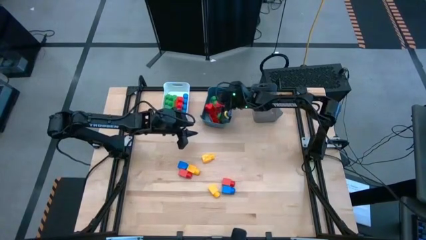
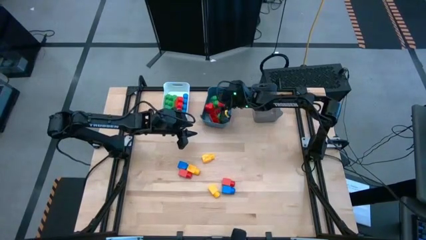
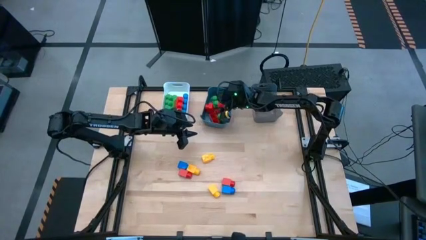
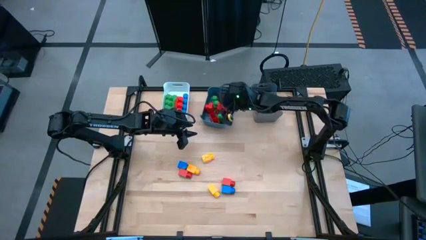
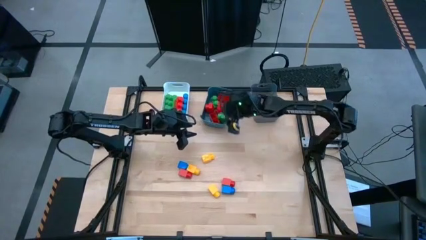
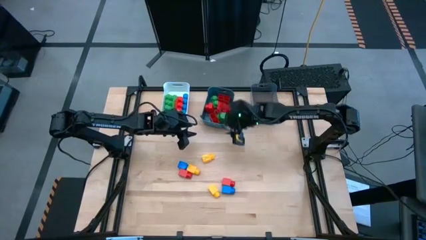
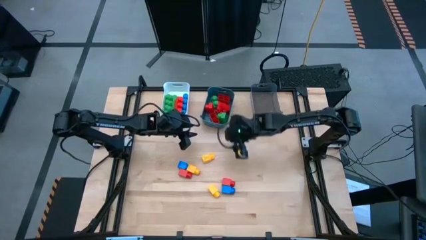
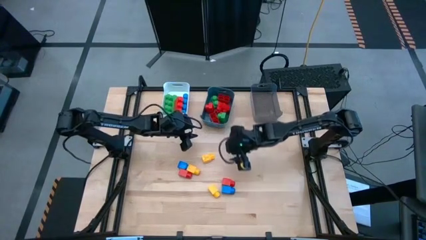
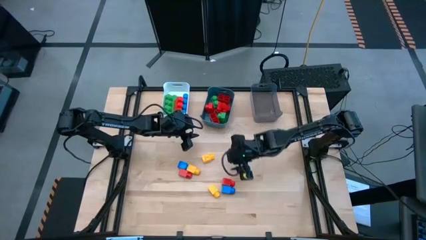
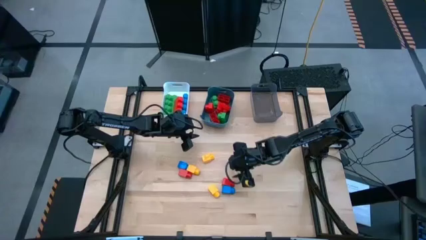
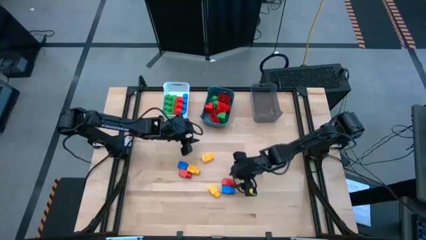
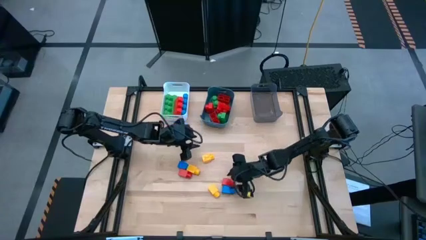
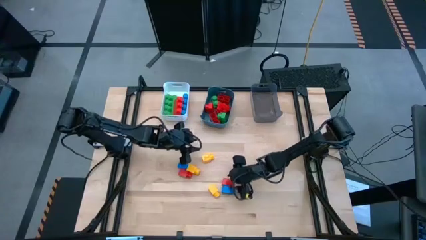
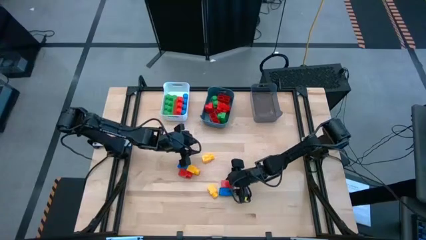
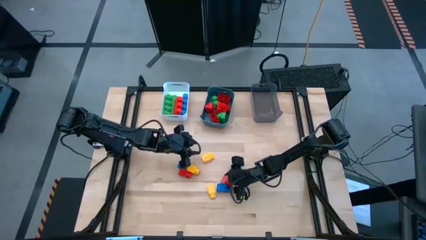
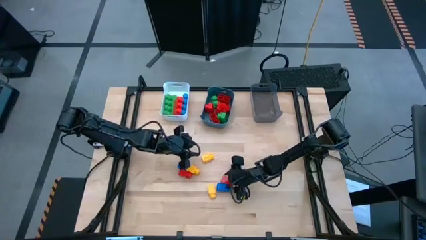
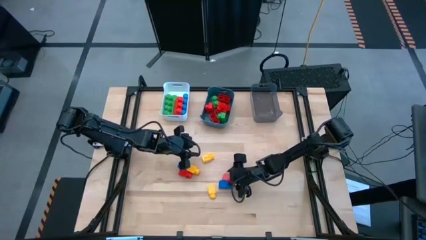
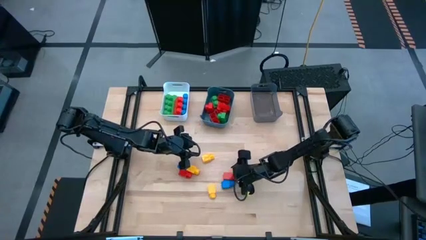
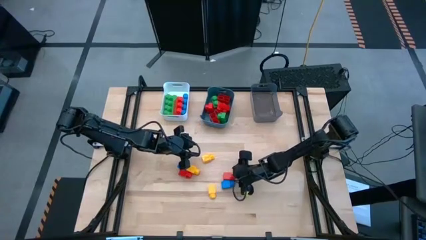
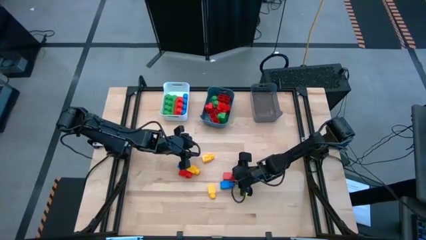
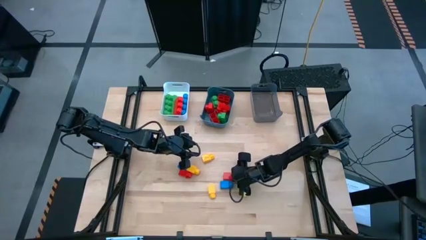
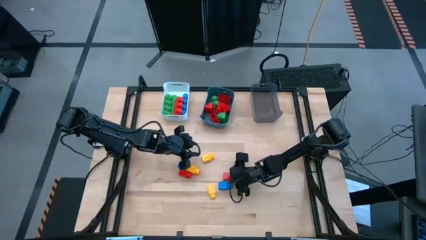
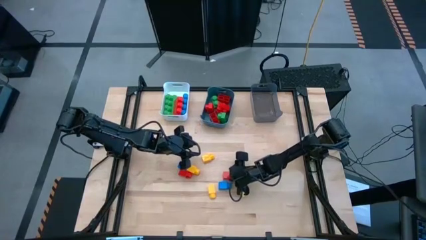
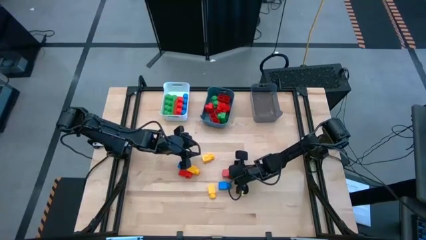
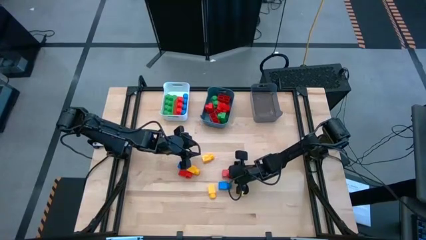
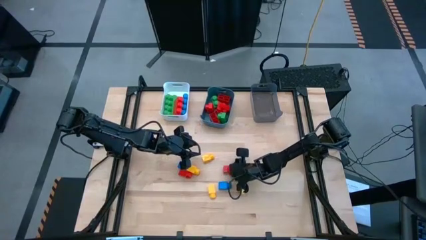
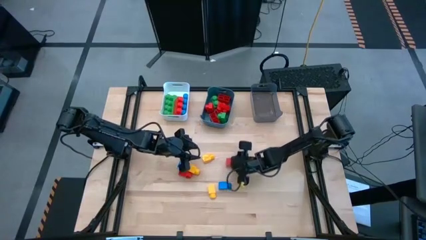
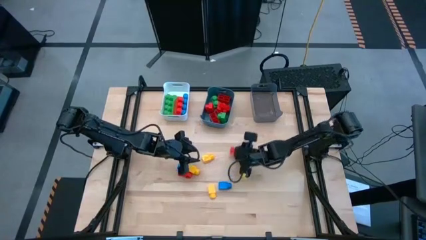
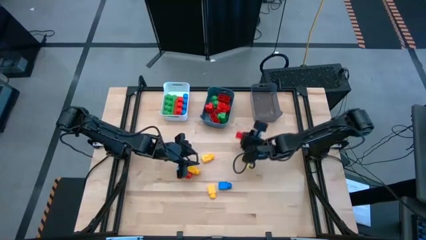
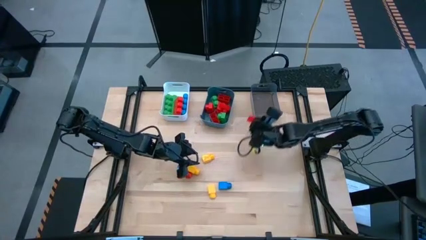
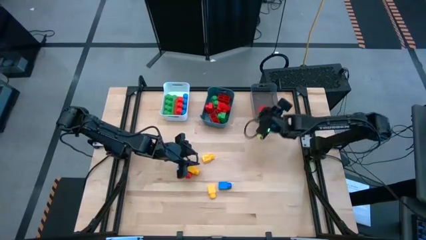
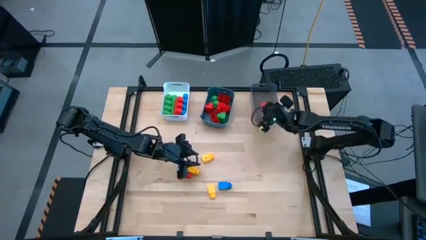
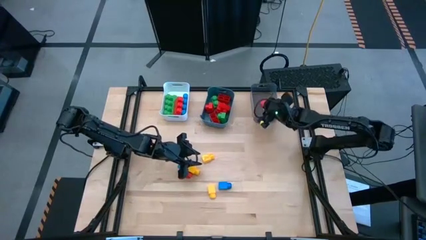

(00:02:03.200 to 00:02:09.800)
Task: Sort blocks by size
Put the 1 stud red game piece into the black bin

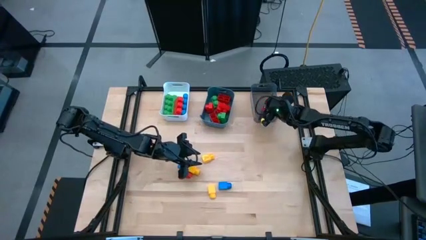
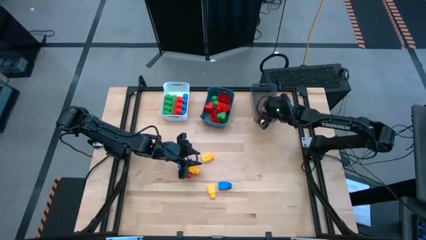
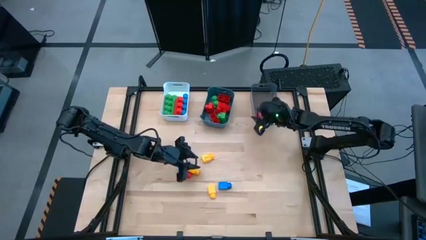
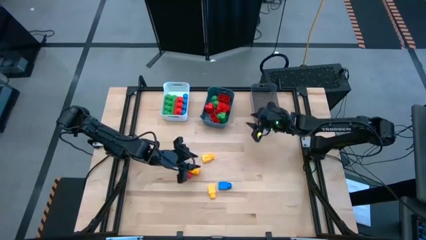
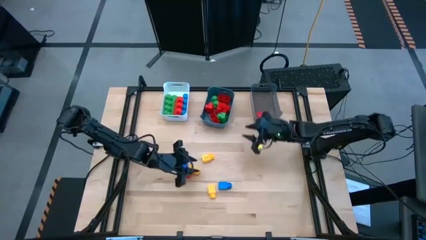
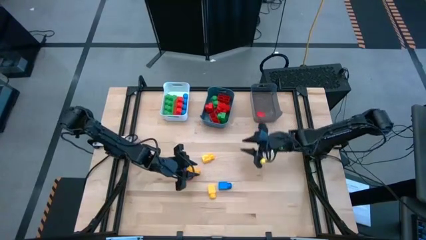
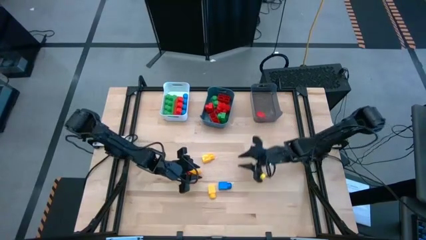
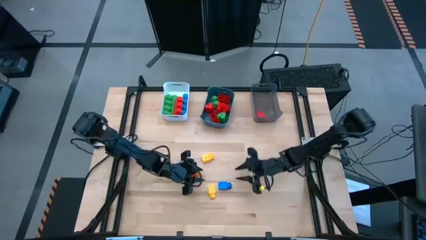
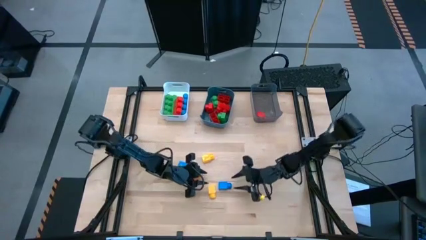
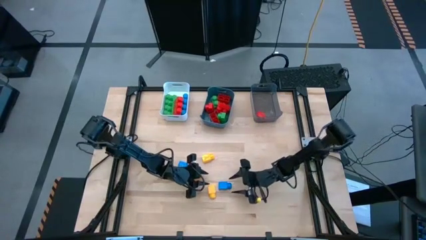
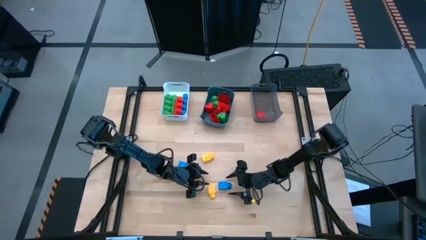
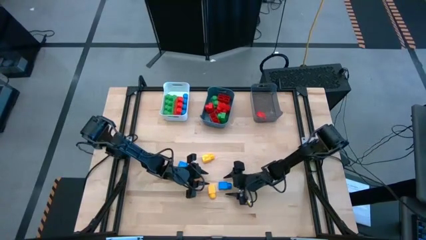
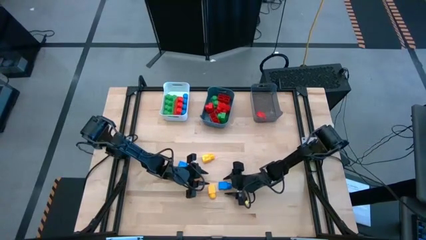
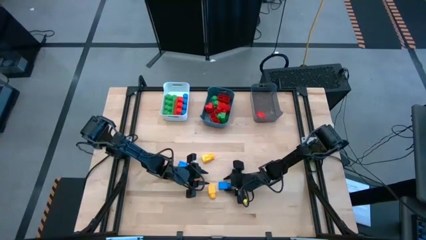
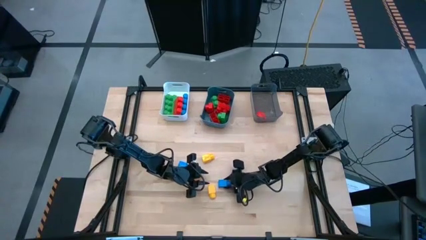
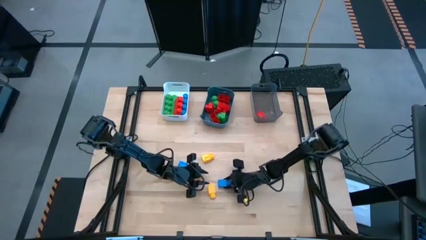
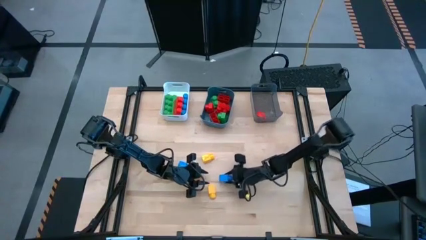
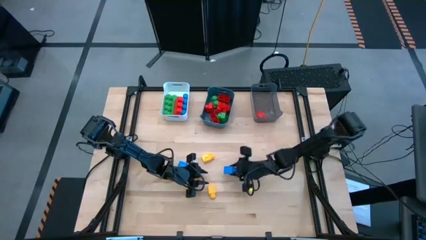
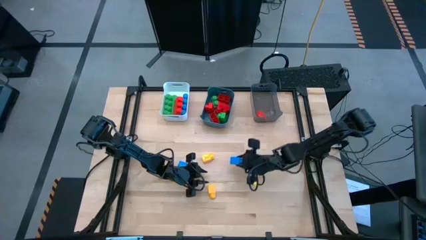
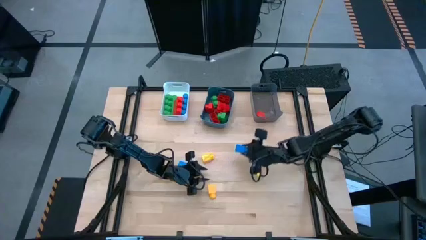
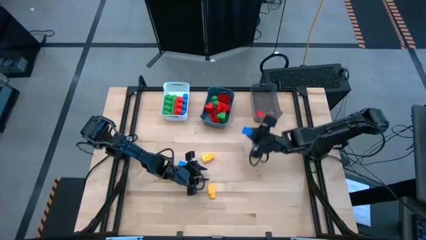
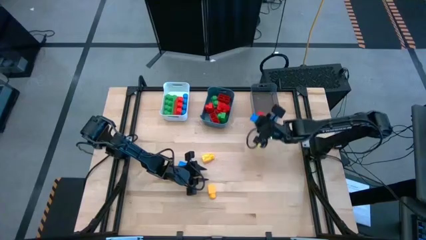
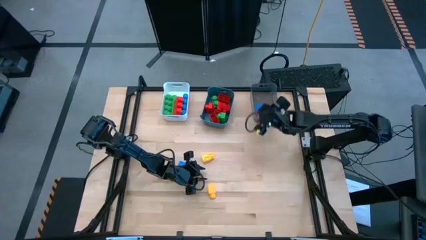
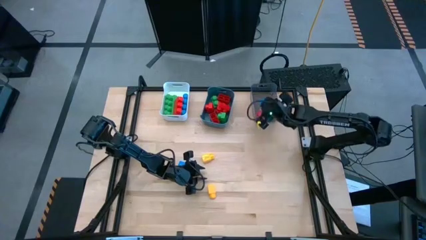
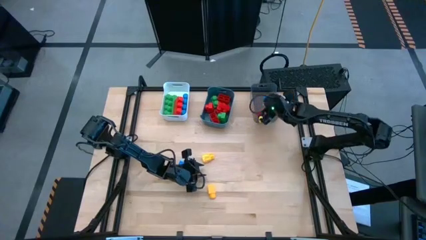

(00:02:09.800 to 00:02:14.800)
Put the 1 stud blue game piece into the black bin

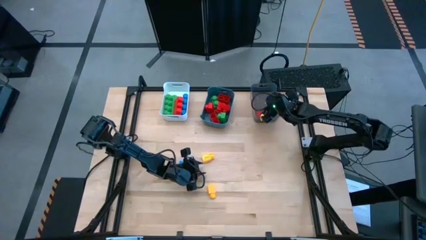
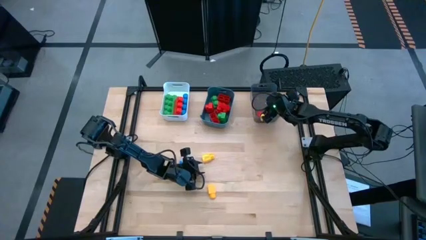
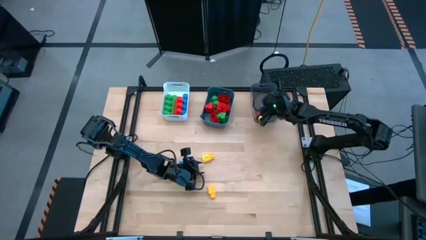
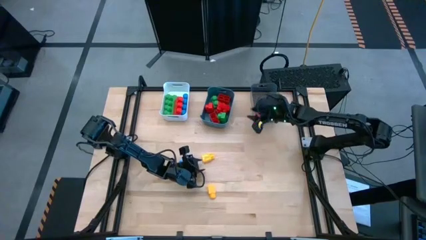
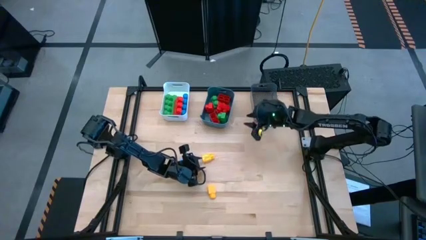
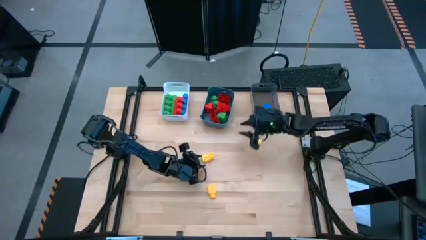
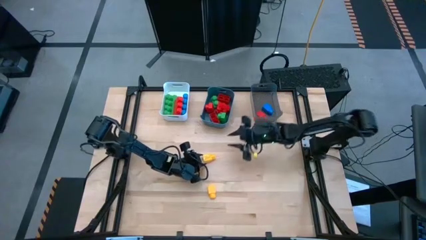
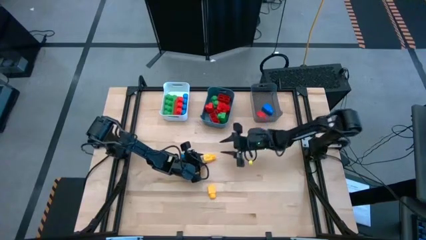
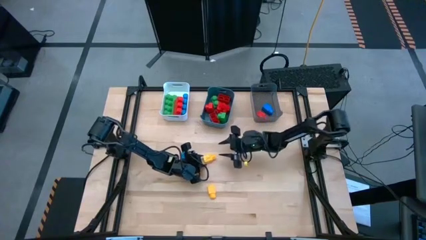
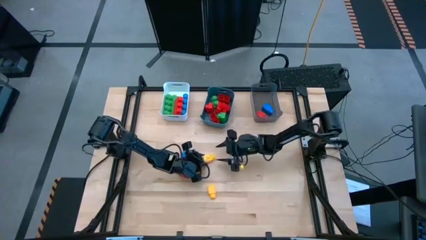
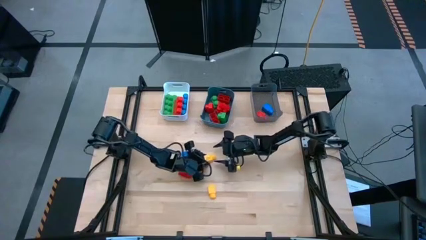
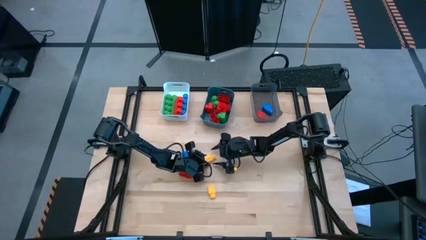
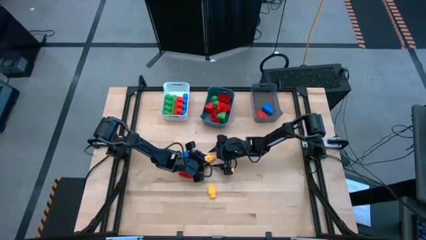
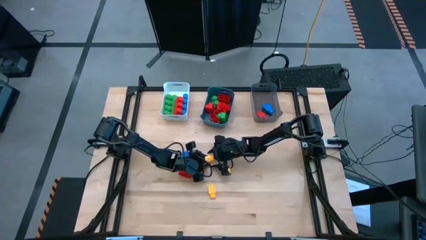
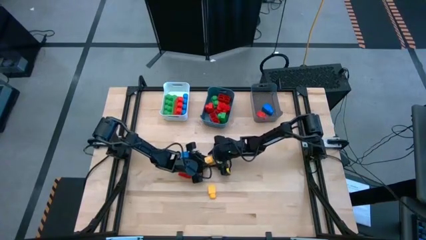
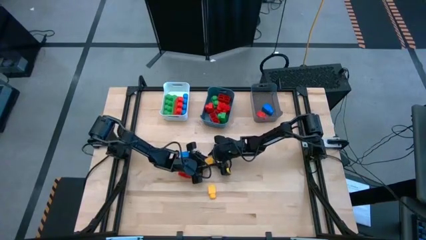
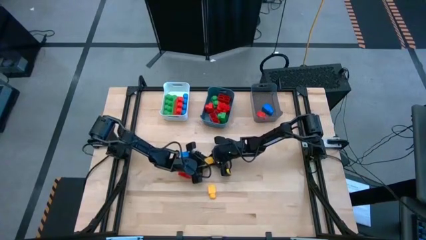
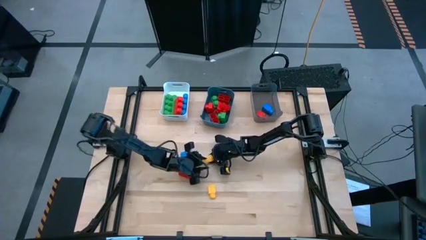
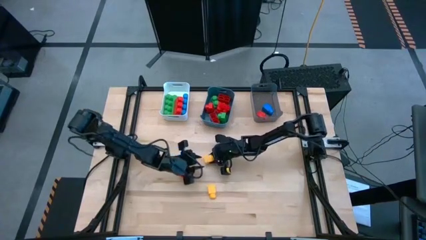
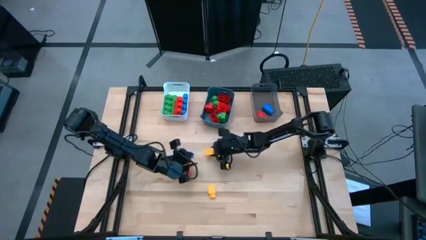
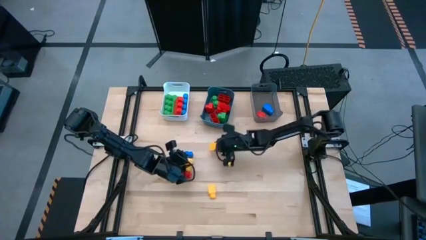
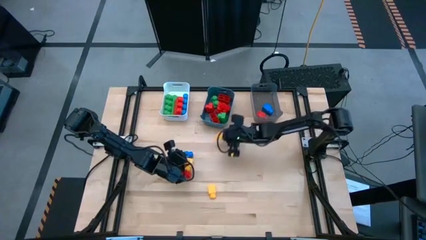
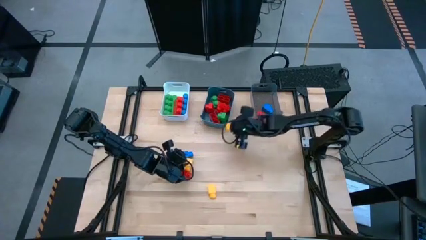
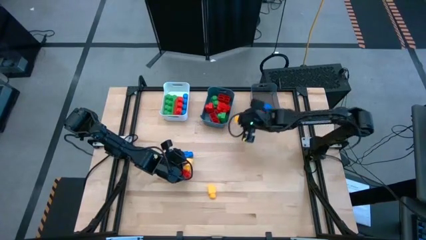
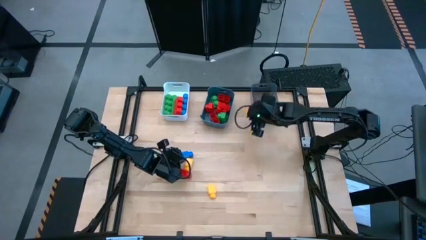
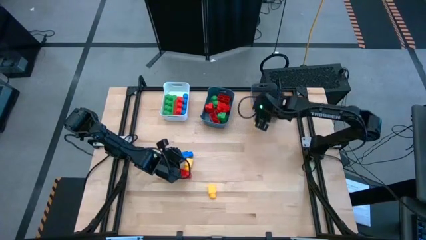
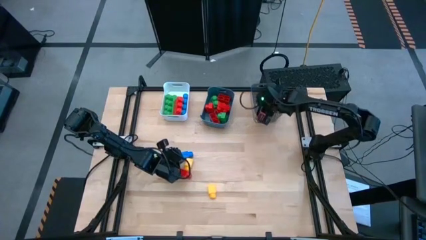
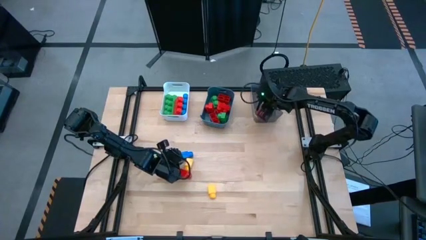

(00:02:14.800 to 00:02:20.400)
Put the 1 stud yellow game piece into the black bin
